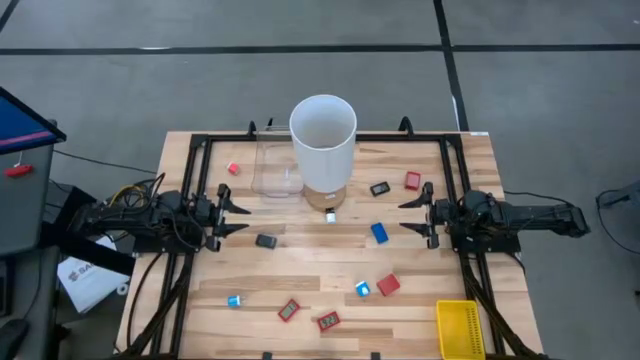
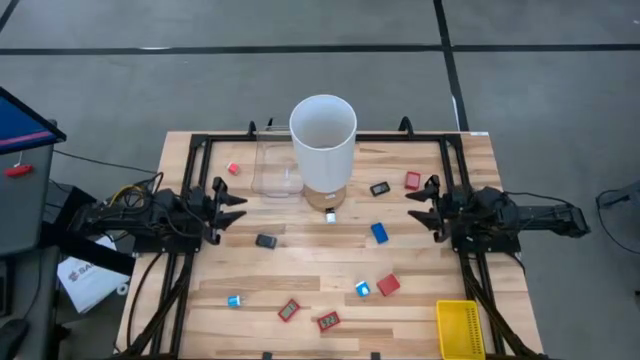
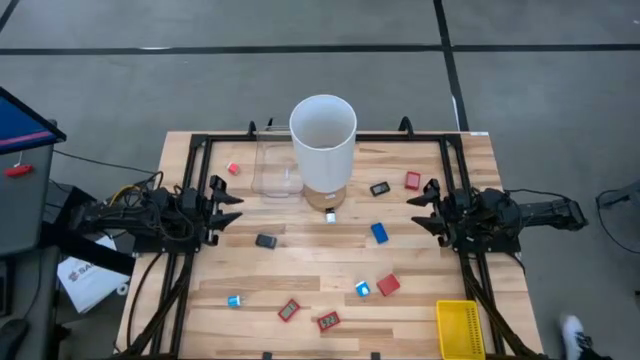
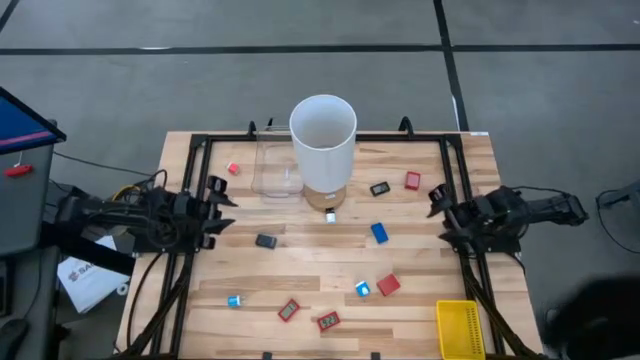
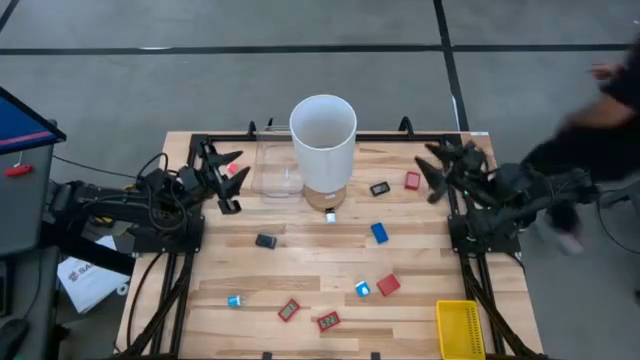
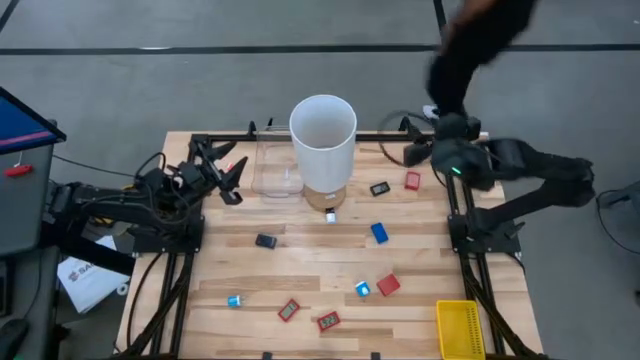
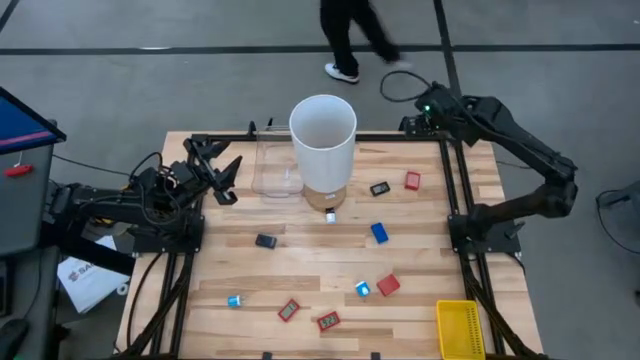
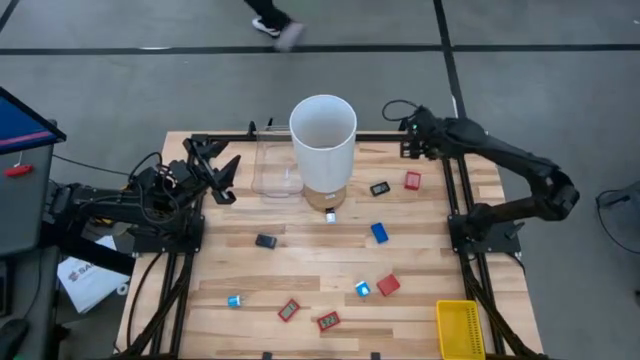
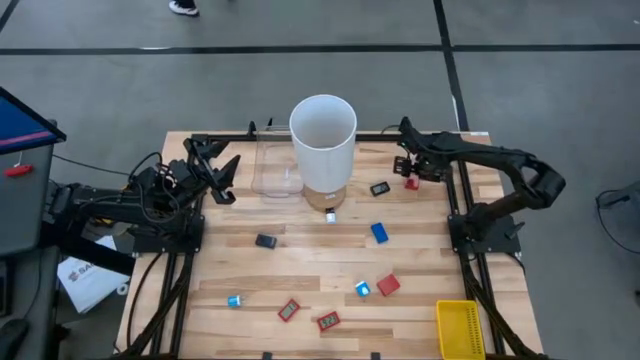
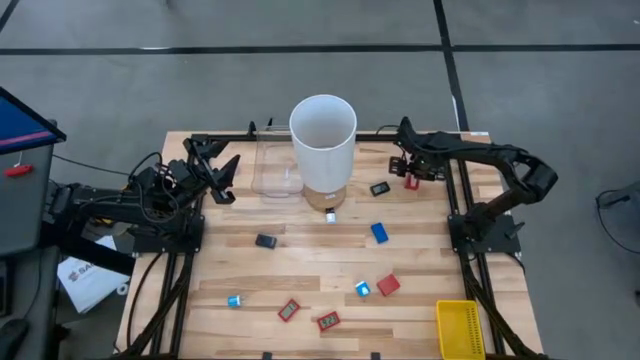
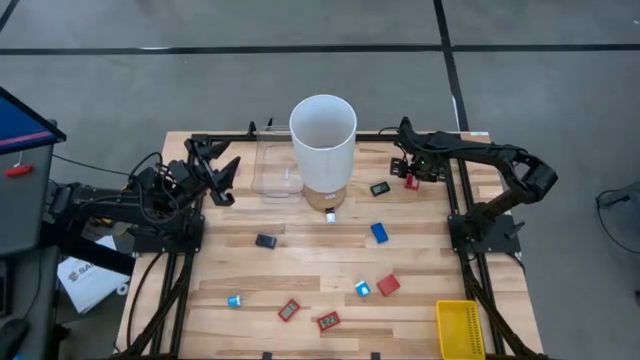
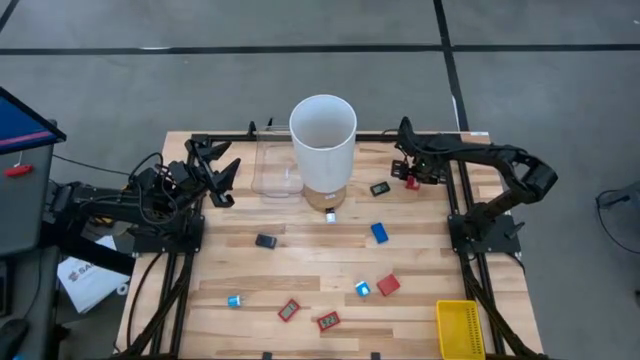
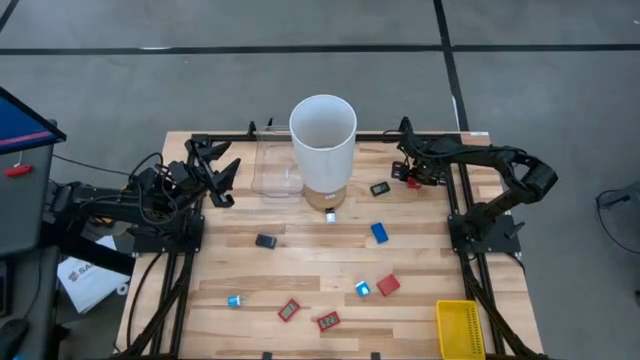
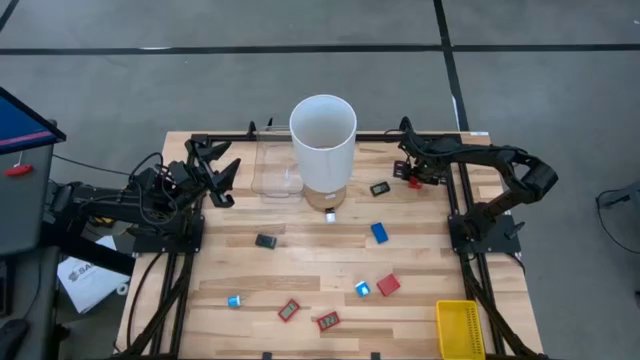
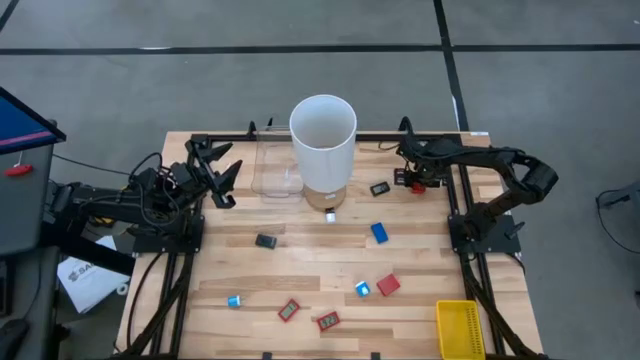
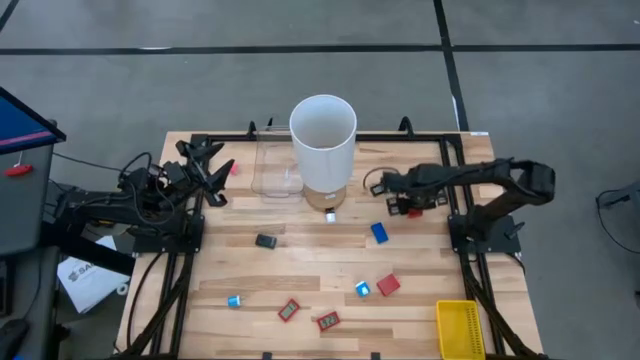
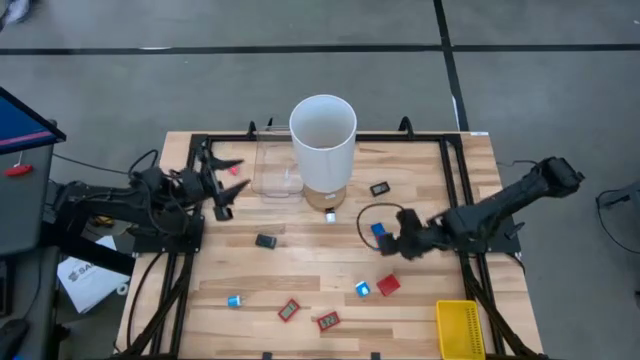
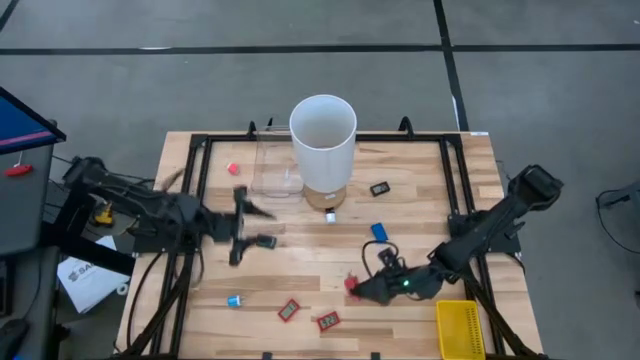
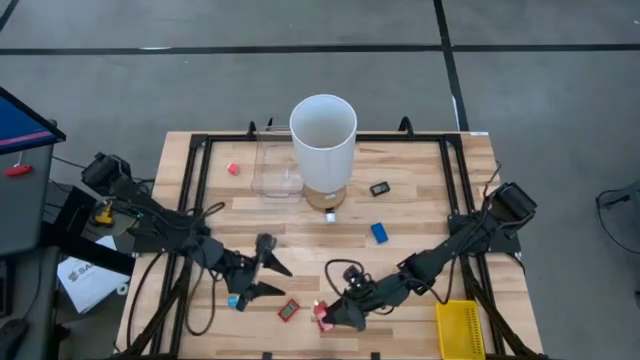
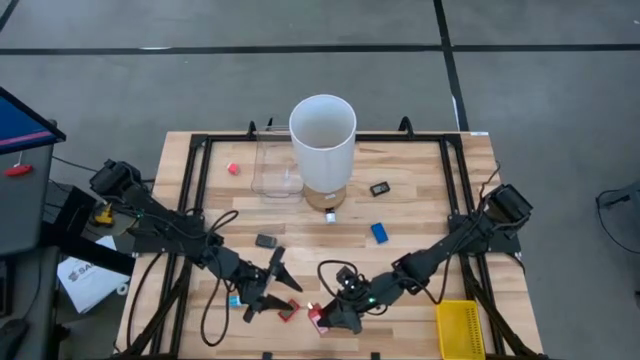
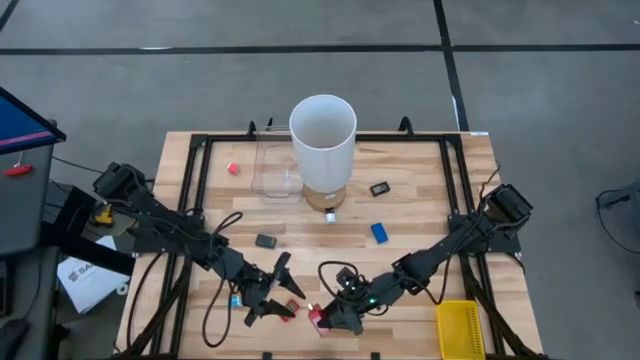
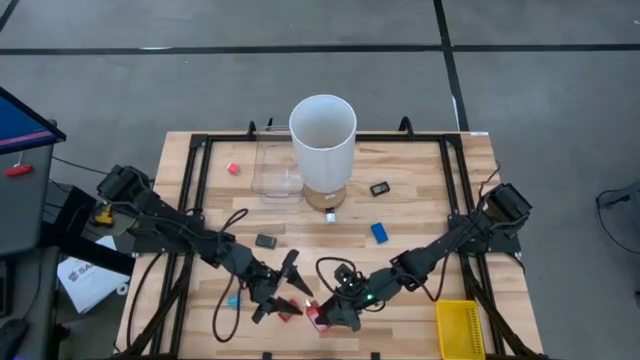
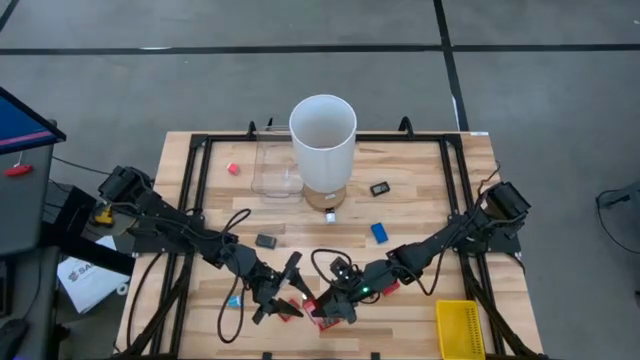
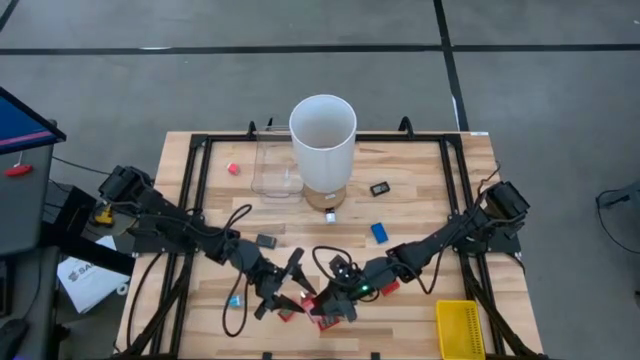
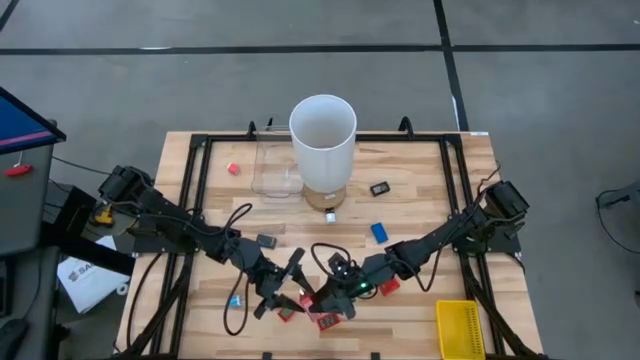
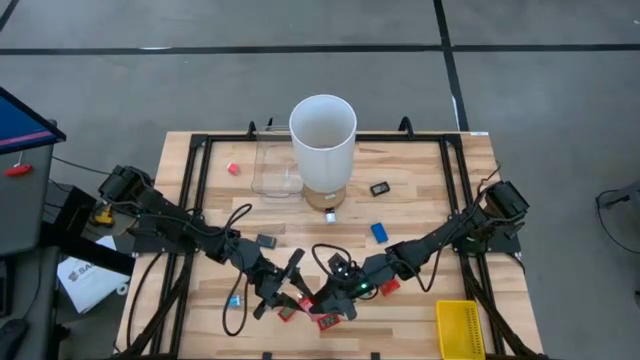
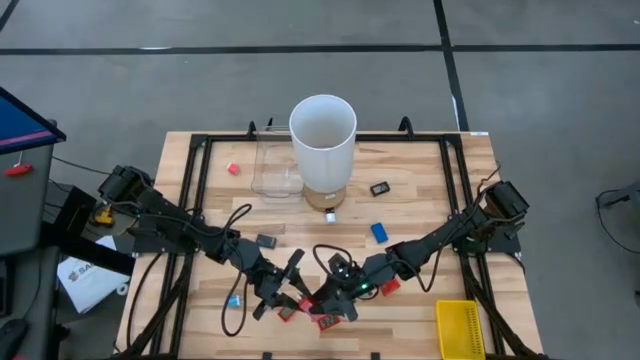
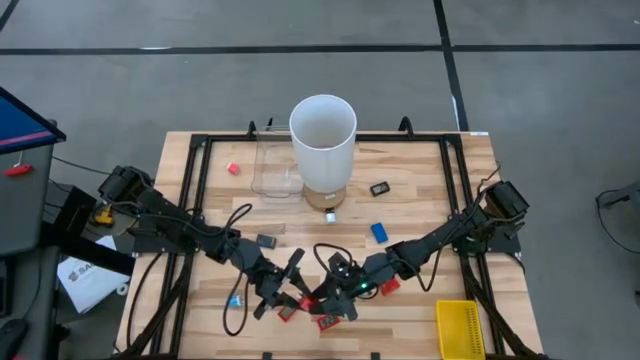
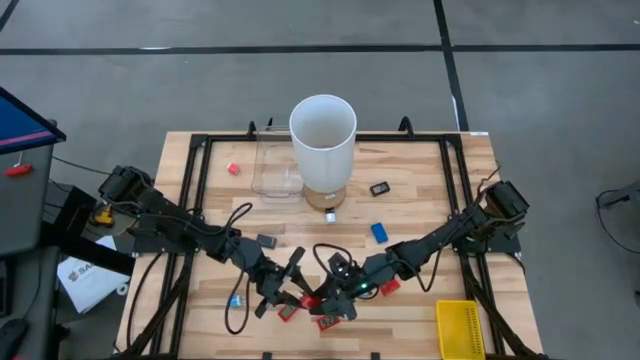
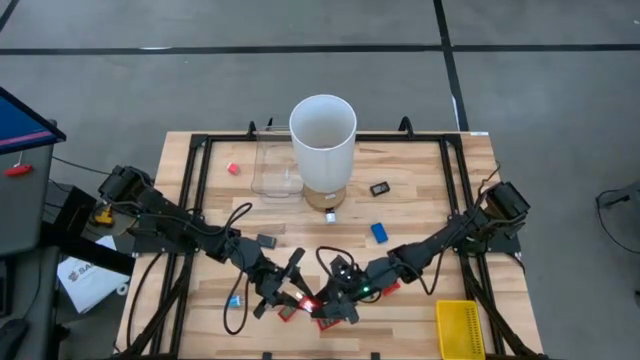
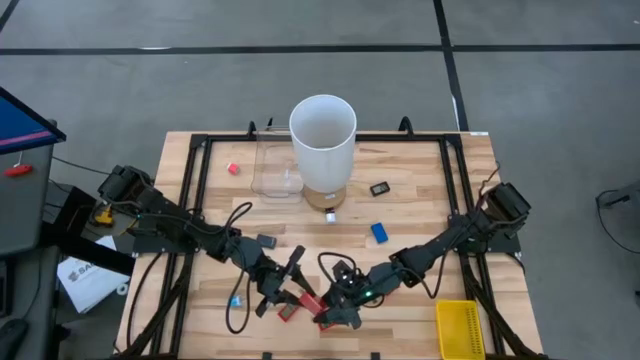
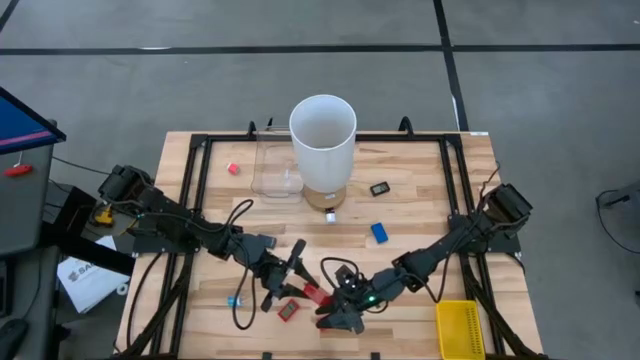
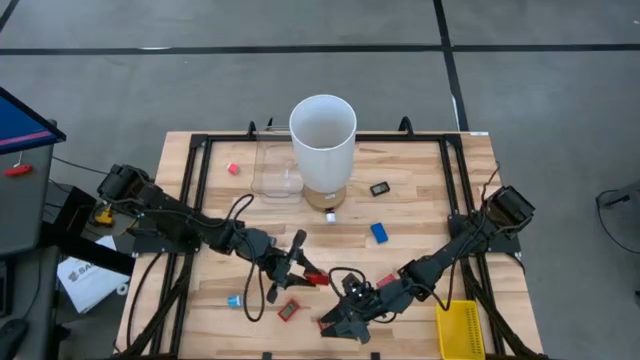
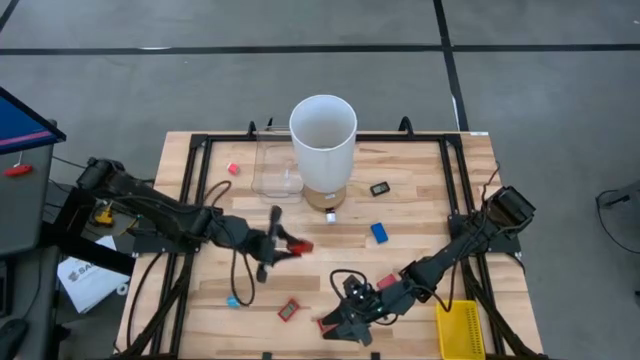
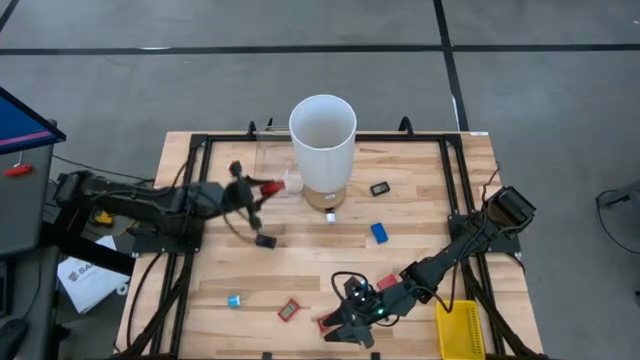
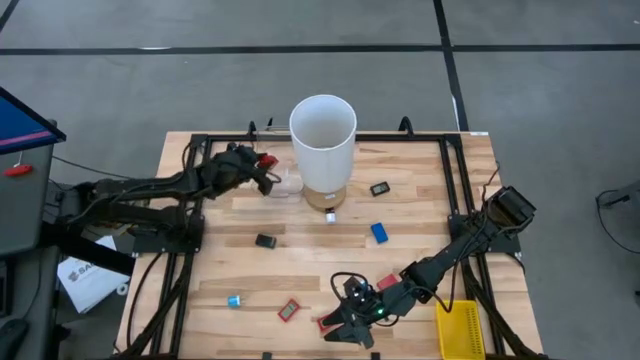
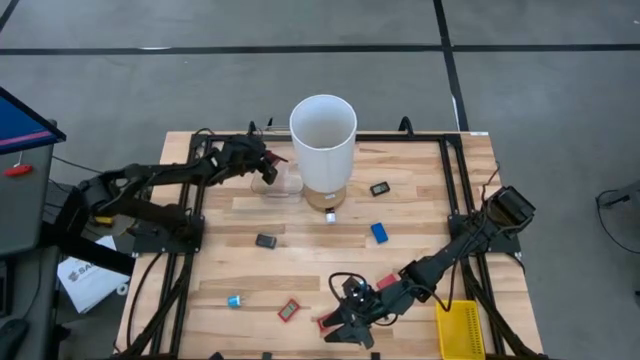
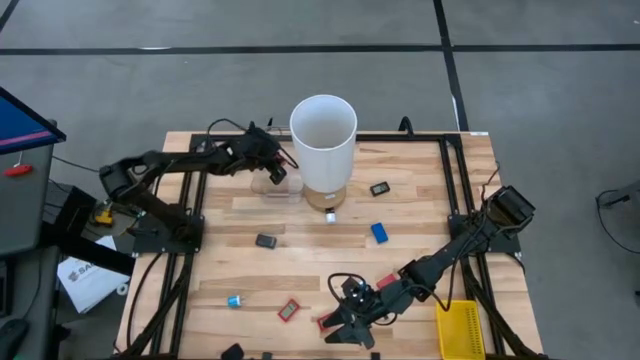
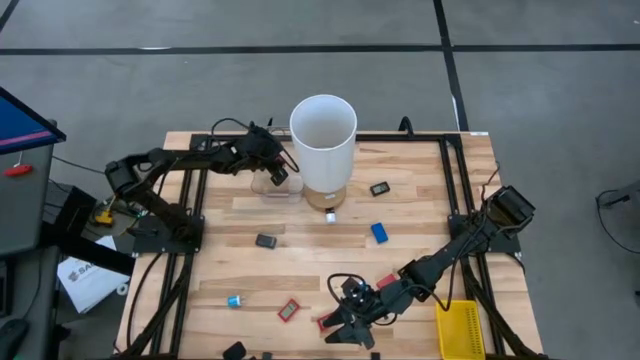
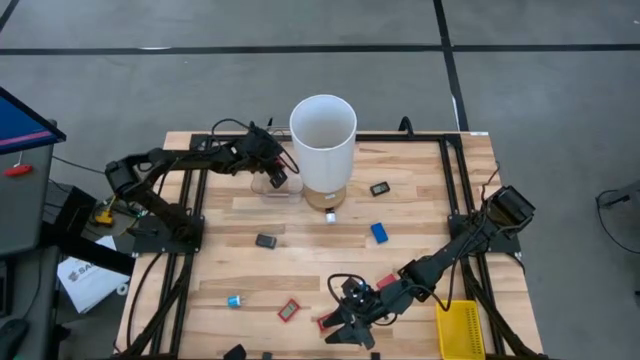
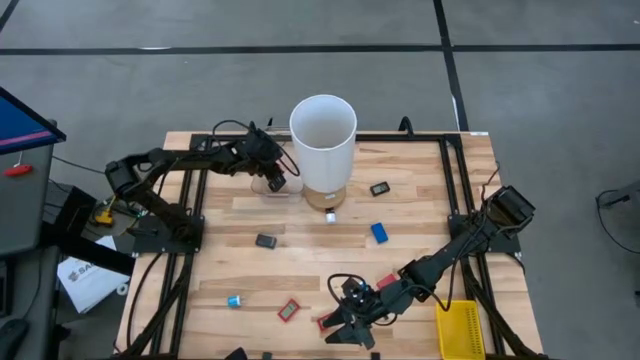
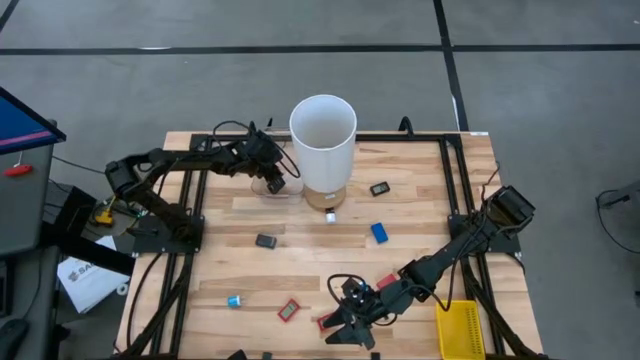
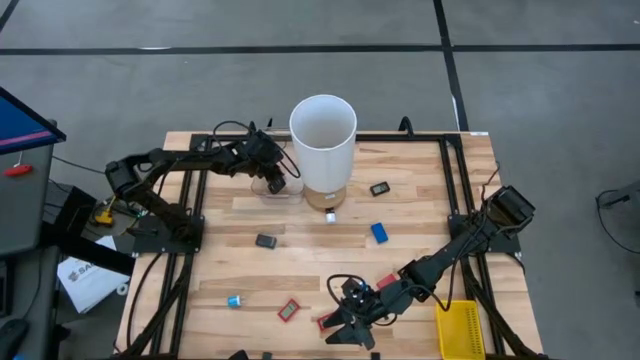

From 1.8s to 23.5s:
Task: Pick & Place Office items
Put the top red charger adapter into the transparent bin
